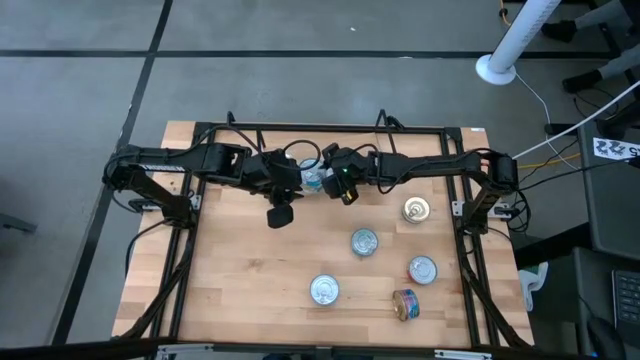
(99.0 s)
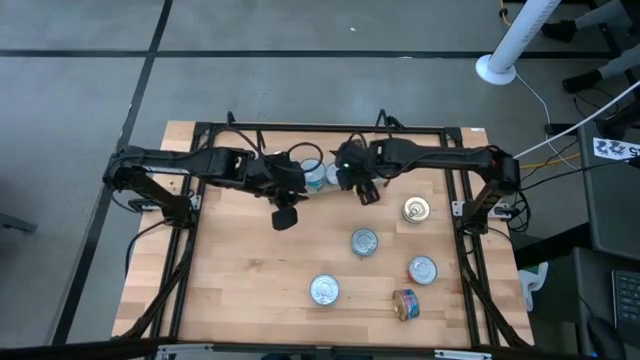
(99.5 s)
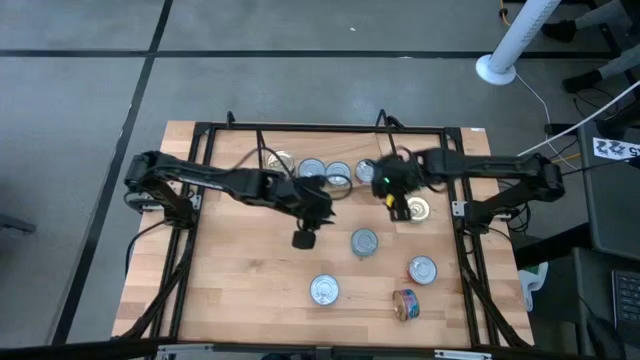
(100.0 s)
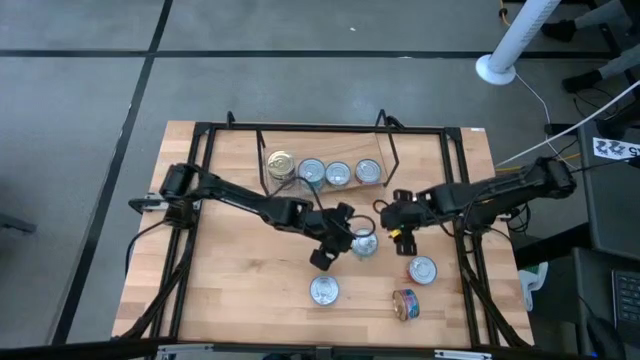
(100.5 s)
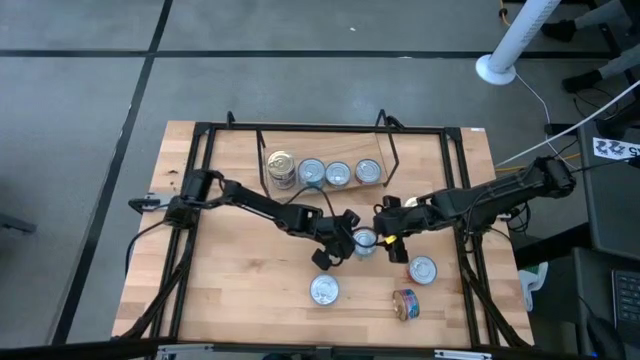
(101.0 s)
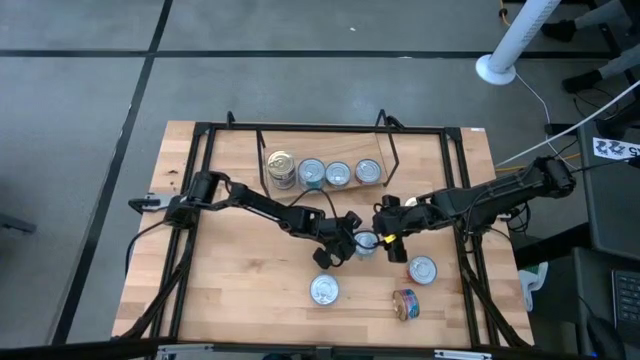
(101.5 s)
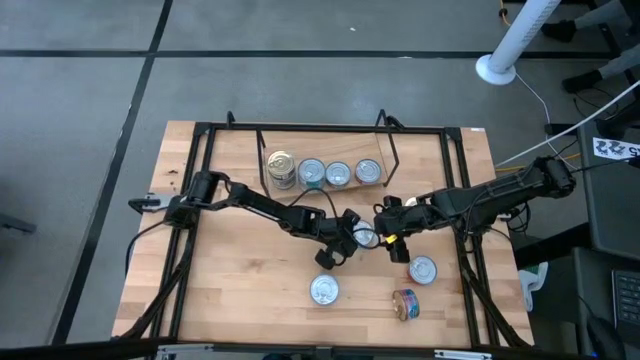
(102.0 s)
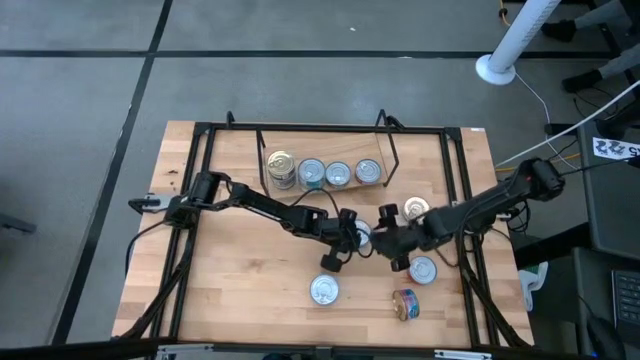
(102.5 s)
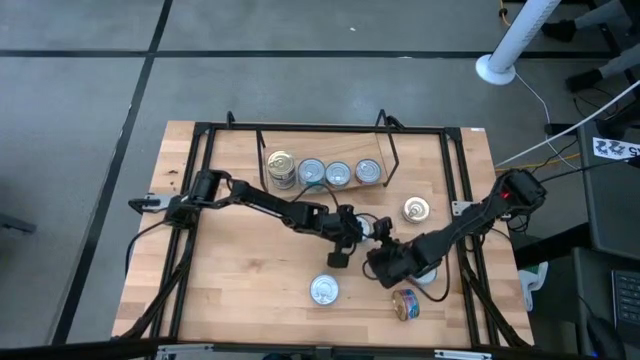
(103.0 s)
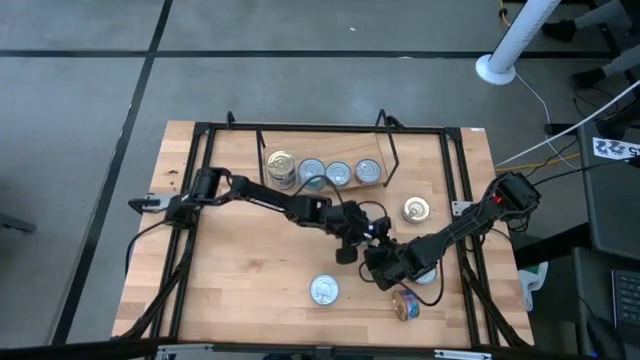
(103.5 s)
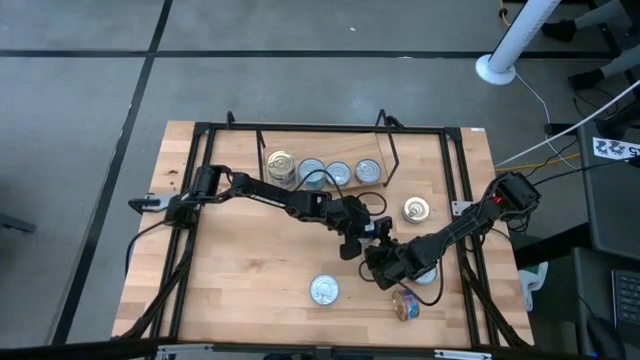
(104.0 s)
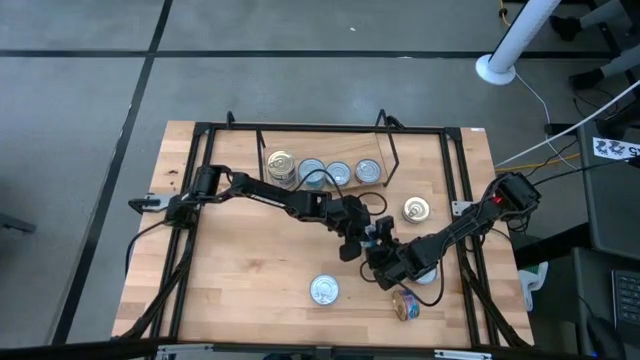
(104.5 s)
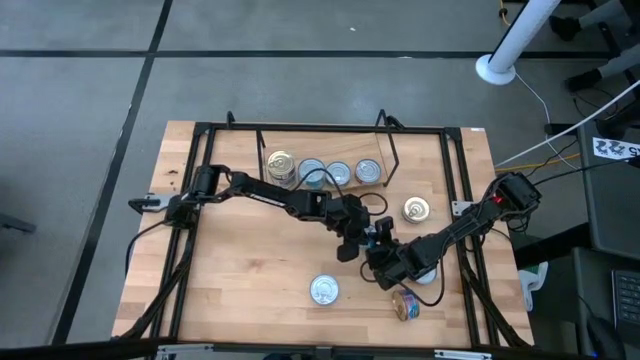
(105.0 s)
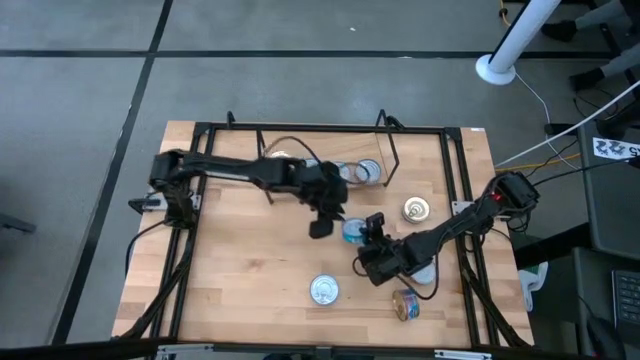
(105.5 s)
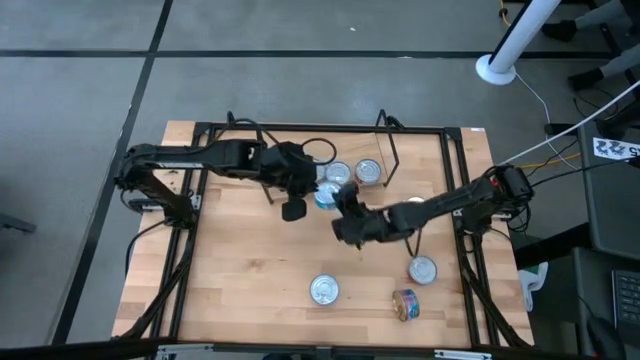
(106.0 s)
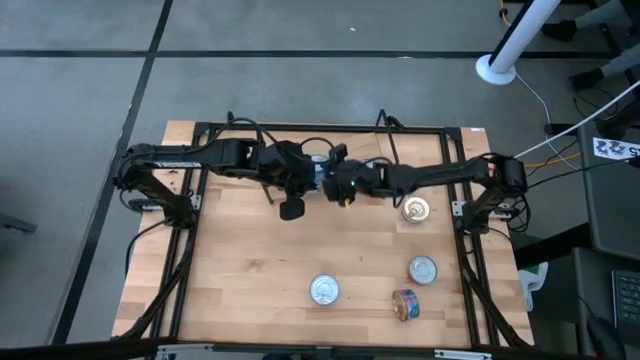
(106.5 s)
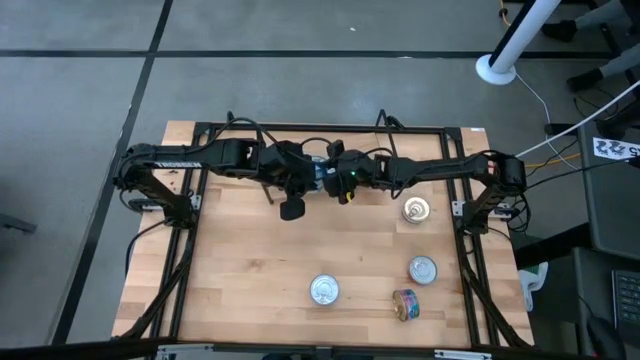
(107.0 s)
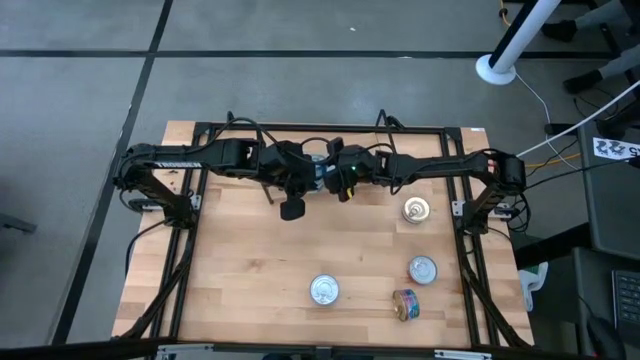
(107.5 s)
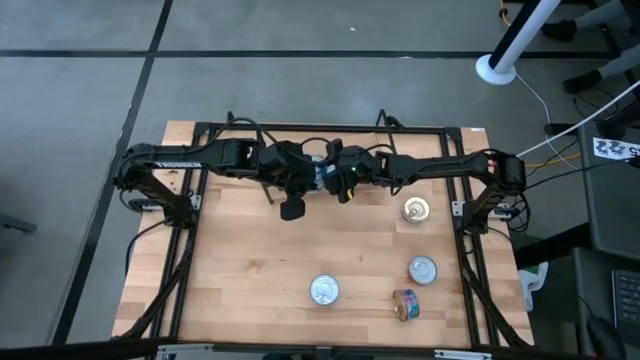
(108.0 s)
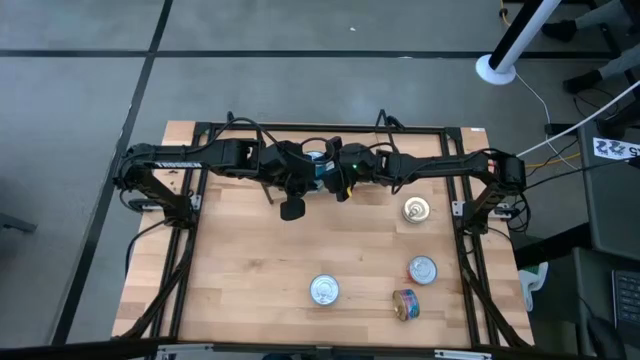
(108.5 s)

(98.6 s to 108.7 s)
Task: Stack canned seafood by type on shelf
Stack the yellow blue tuna can on top of the other yellow blue tuna cans on the shelf

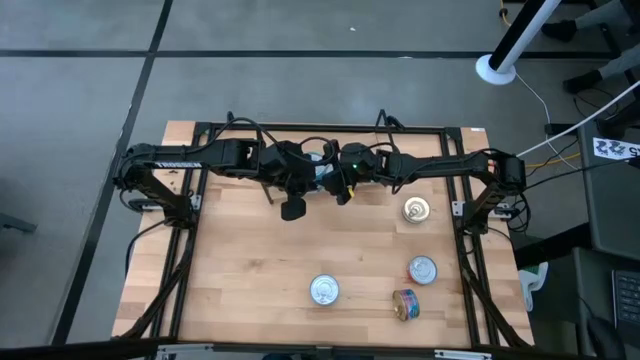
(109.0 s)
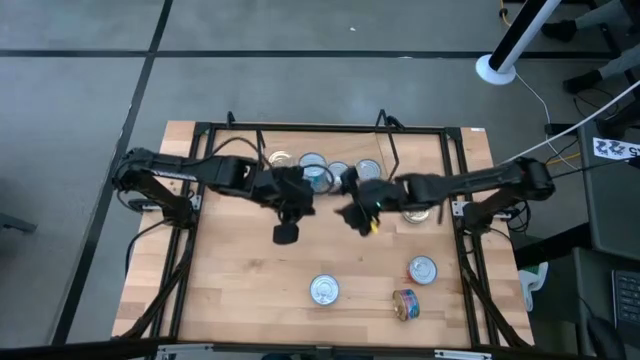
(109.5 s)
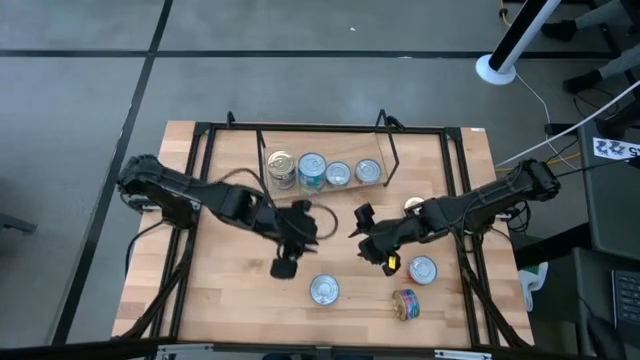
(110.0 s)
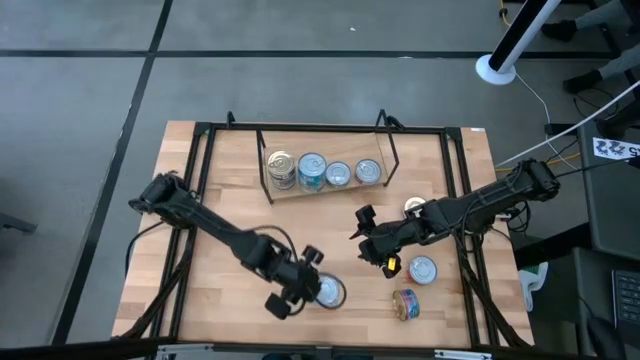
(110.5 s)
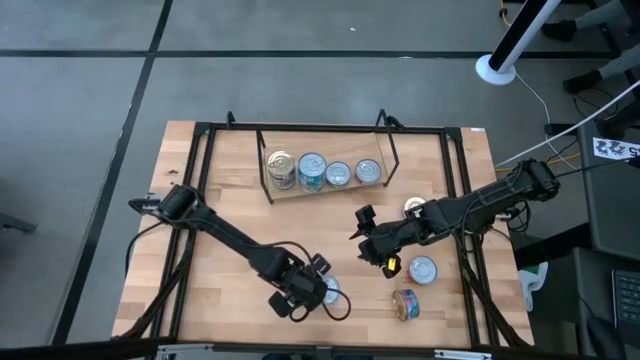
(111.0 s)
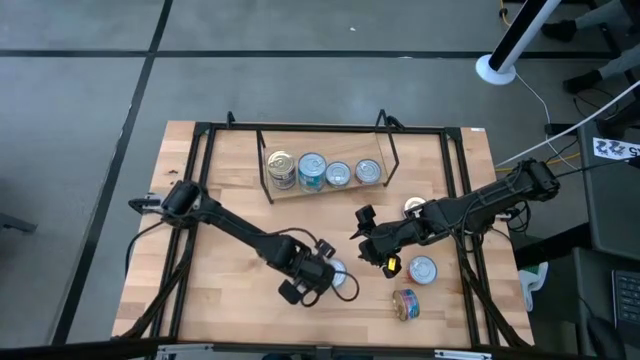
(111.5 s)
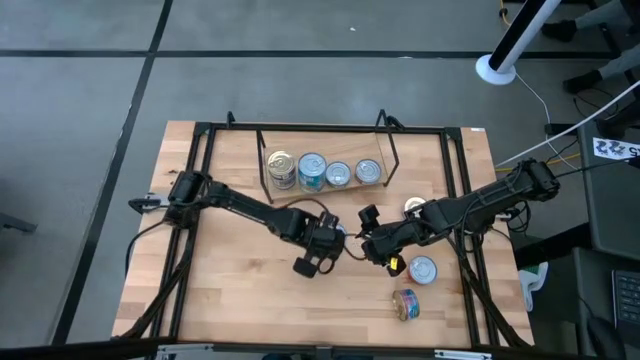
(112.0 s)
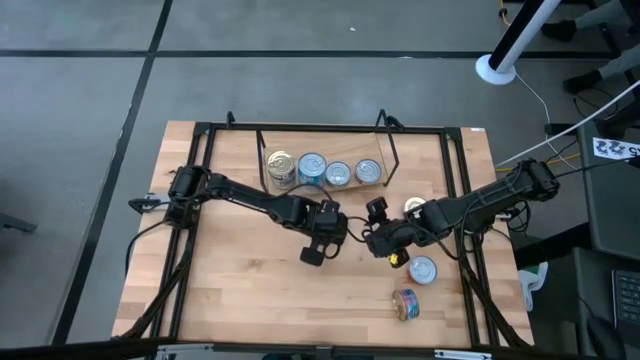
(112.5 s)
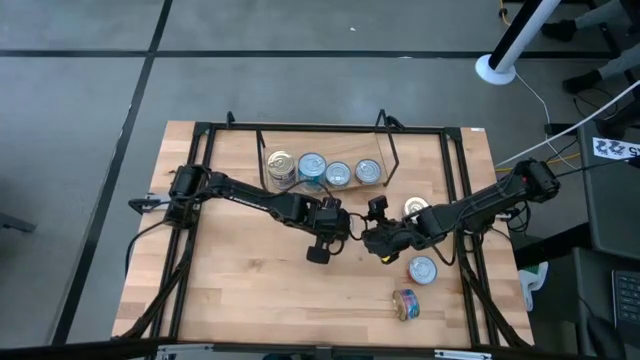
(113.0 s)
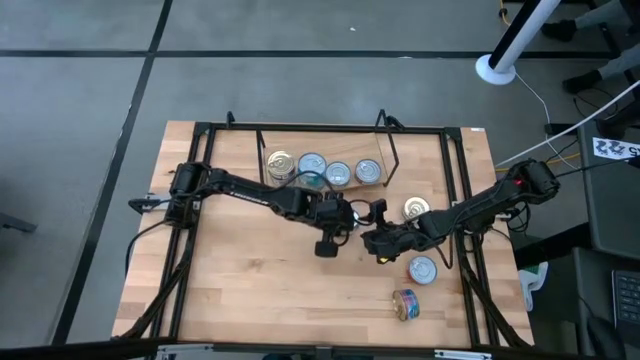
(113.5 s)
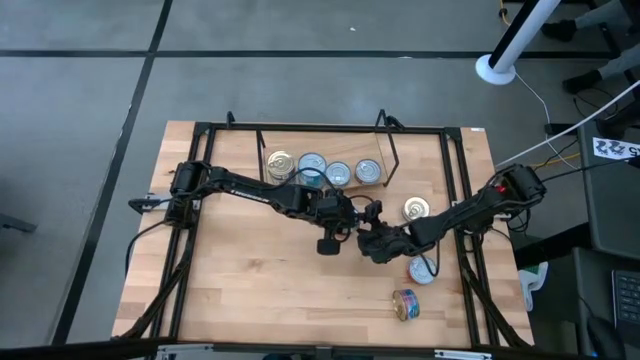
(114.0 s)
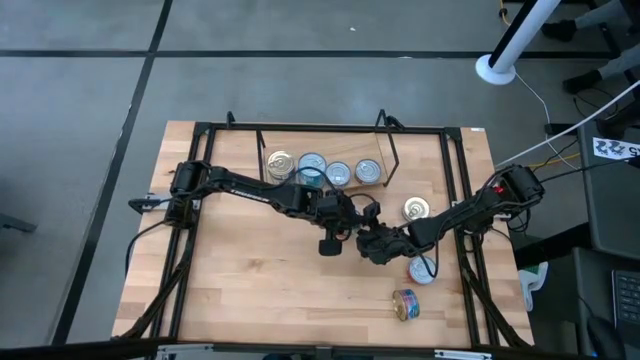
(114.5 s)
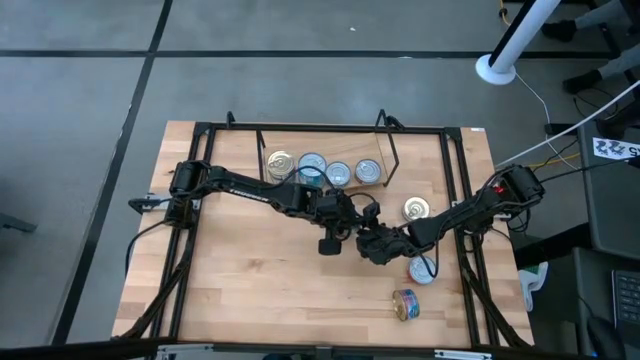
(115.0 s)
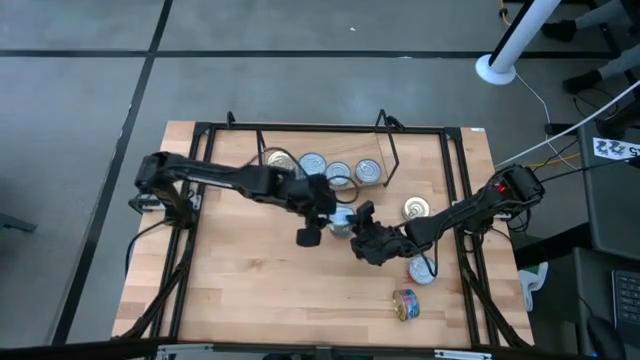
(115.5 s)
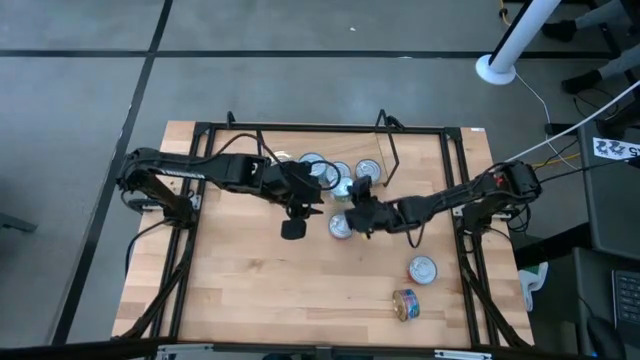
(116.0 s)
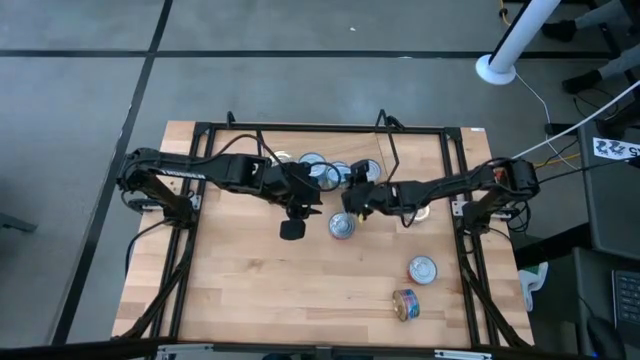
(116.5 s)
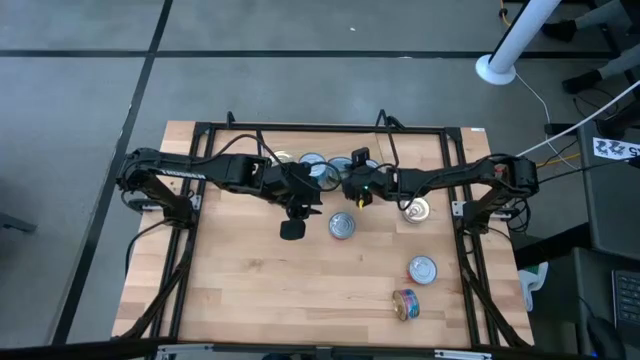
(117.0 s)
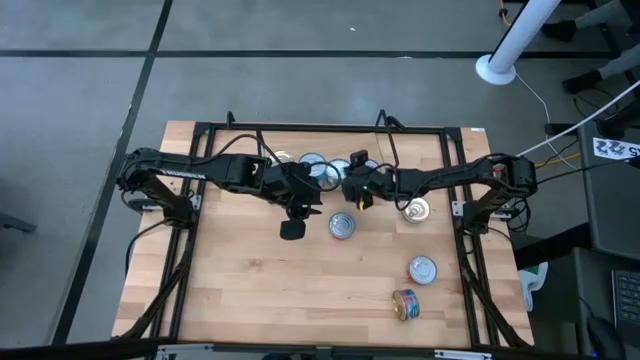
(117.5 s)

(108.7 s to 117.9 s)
Stack the green tuna can on top of the other green tuna can on the shelf

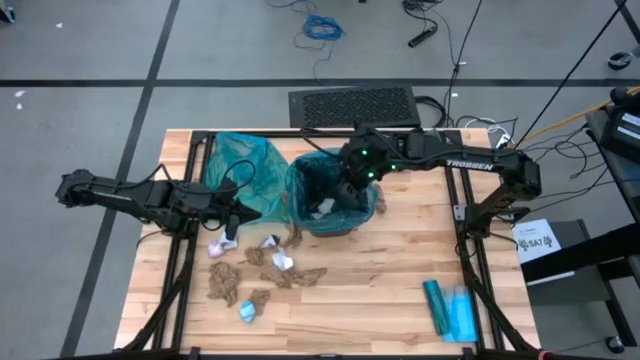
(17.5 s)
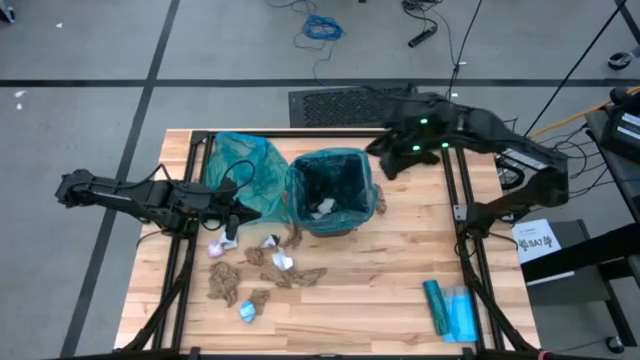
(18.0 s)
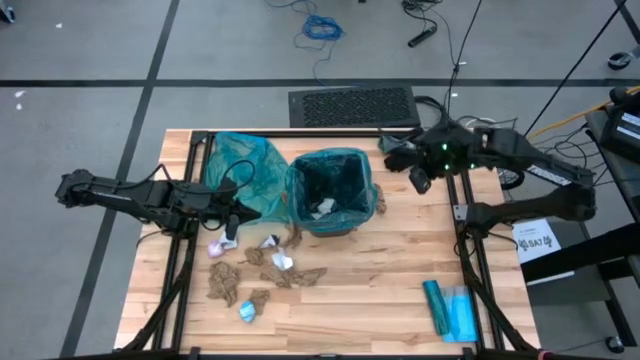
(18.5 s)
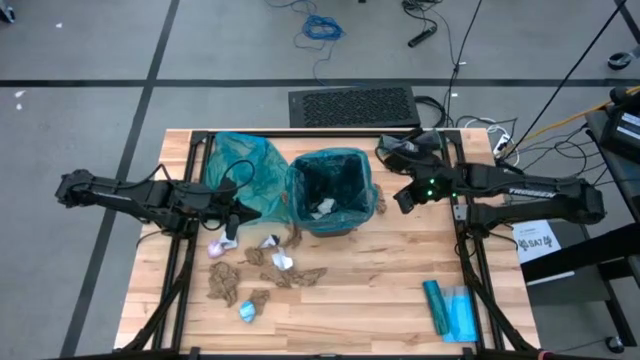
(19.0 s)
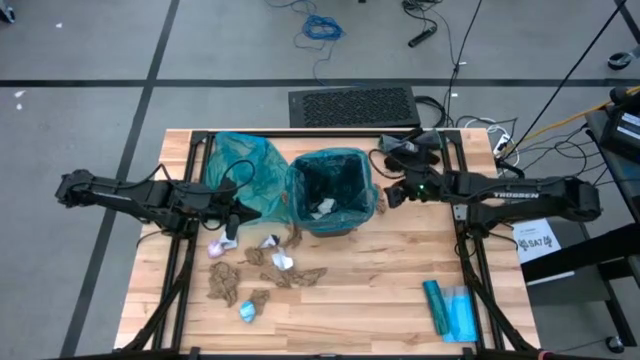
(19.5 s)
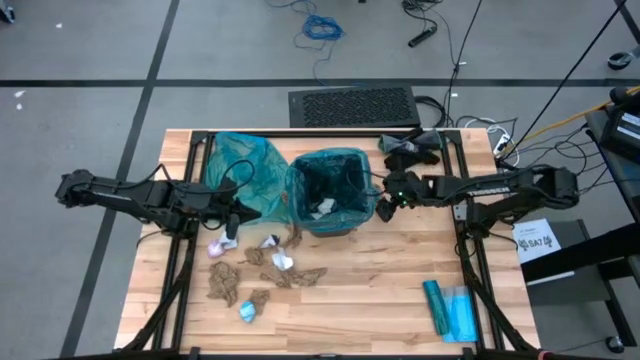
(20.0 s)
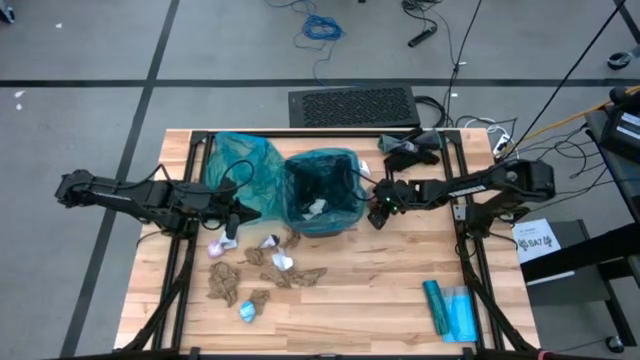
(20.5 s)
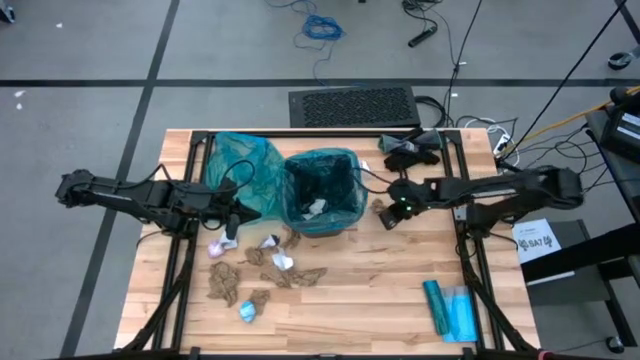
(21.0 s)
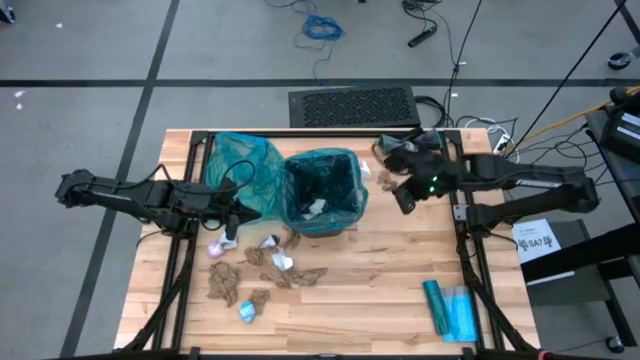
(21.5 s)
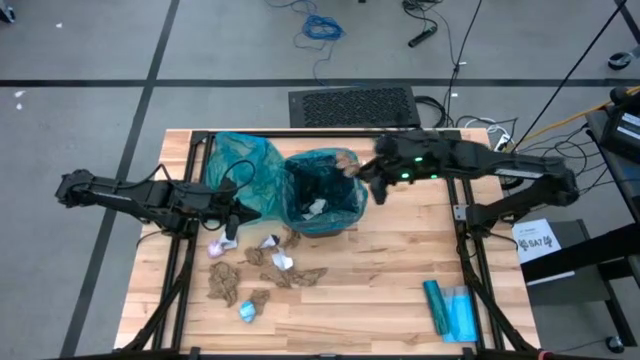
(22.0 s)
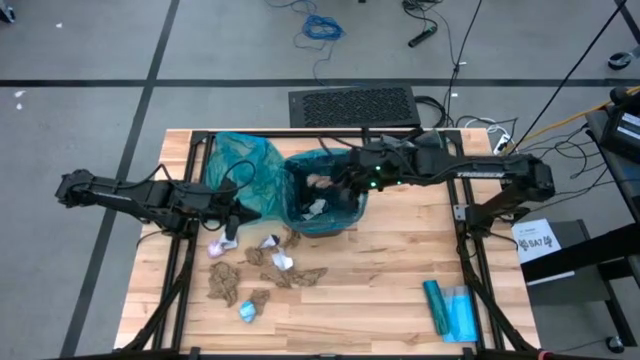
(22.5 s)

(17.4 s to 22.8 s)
Task: place trash/remove bag and relplace
Put the brown napkin into the trash bin
